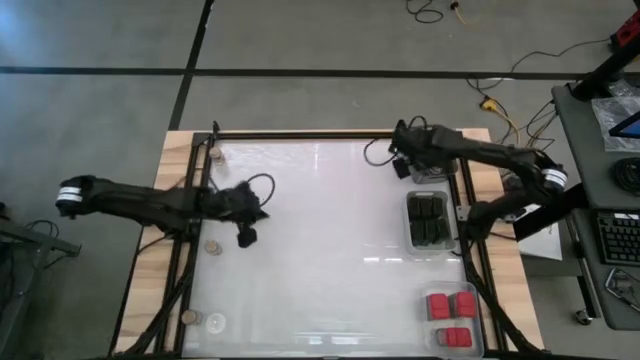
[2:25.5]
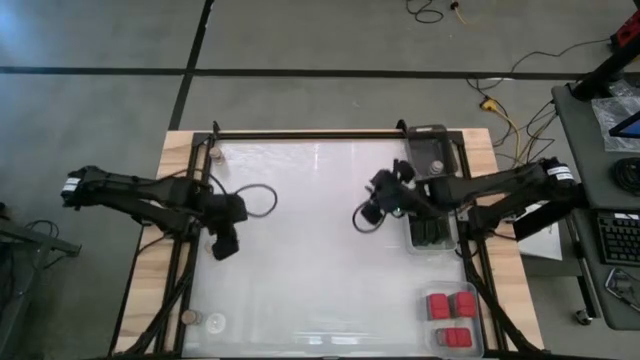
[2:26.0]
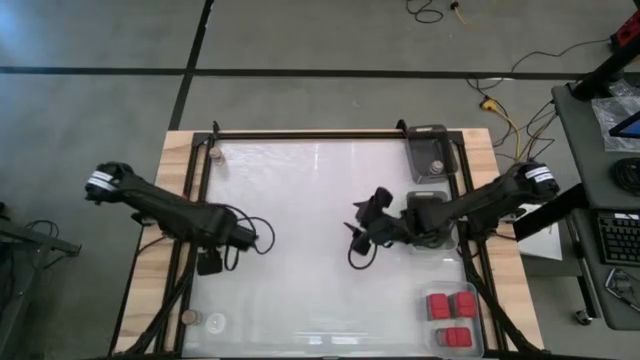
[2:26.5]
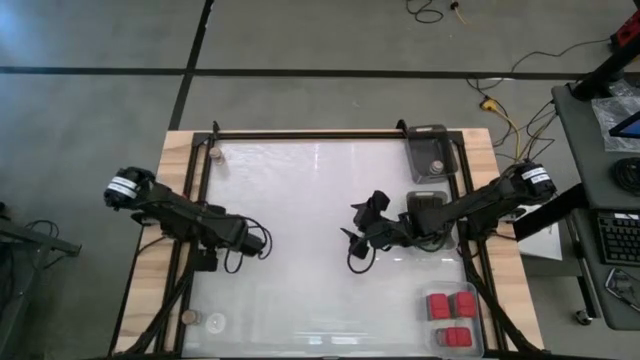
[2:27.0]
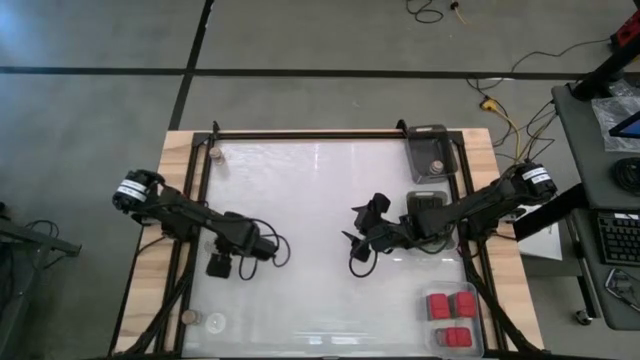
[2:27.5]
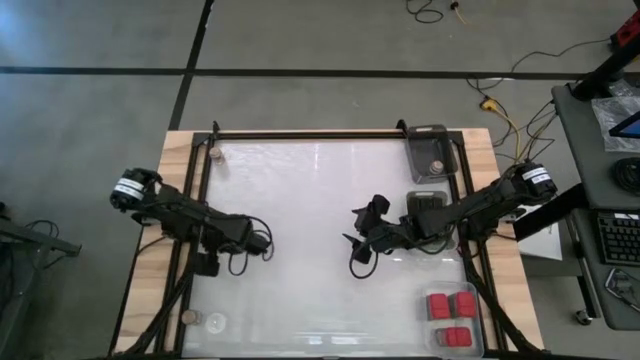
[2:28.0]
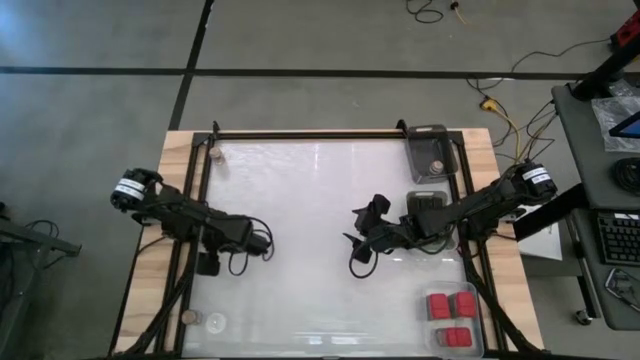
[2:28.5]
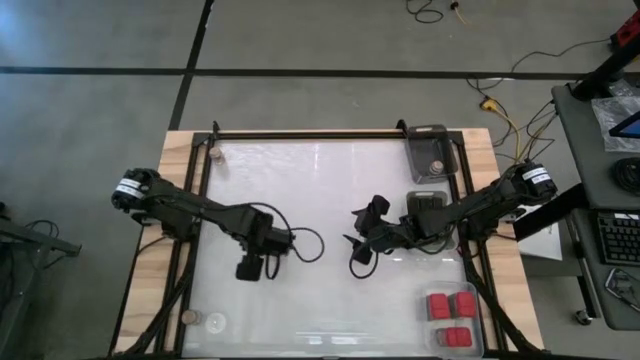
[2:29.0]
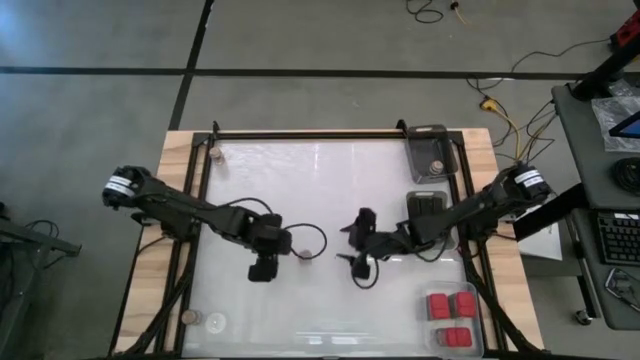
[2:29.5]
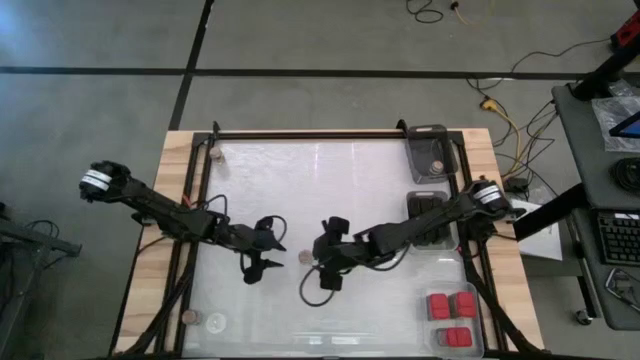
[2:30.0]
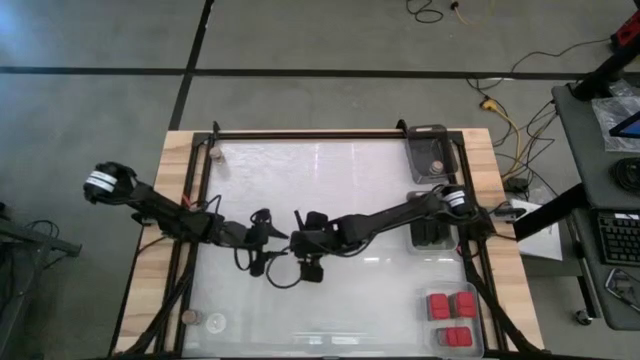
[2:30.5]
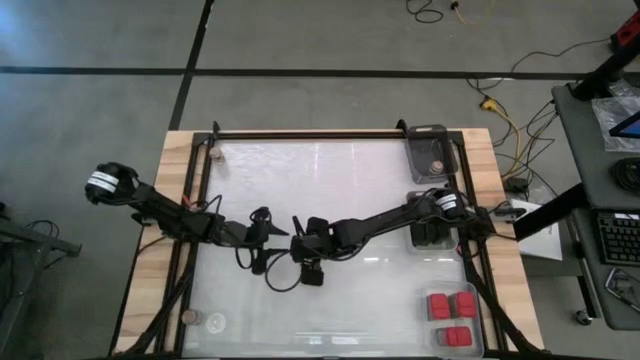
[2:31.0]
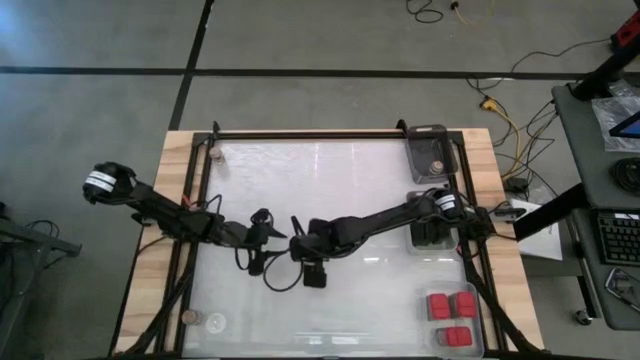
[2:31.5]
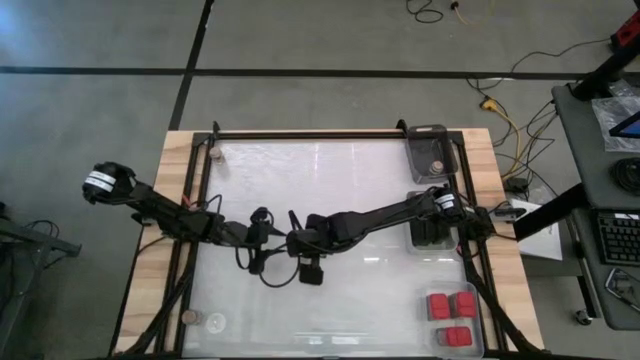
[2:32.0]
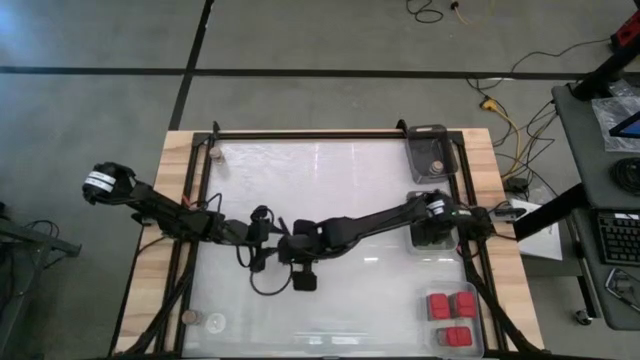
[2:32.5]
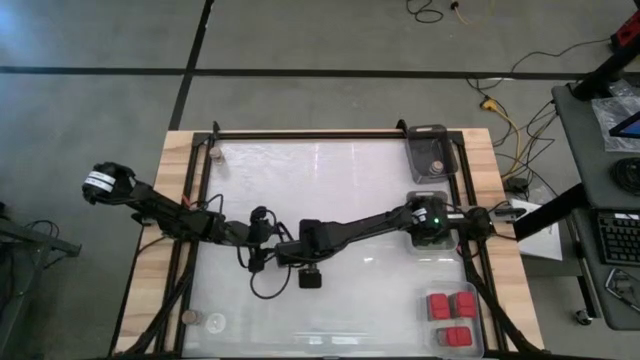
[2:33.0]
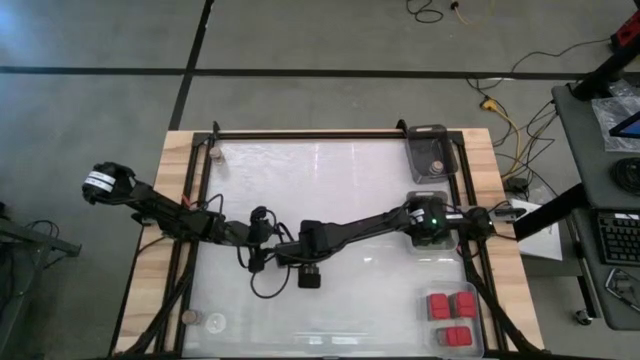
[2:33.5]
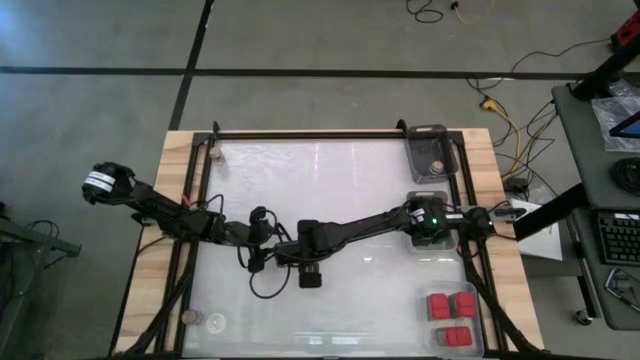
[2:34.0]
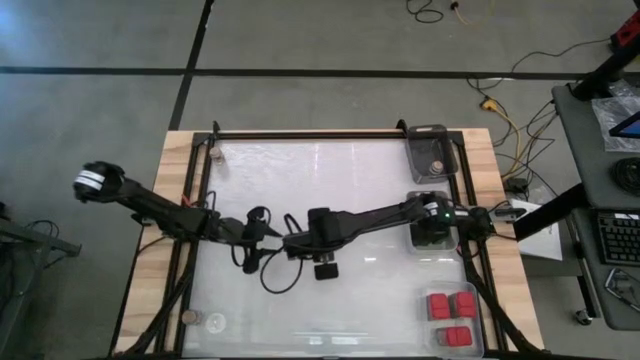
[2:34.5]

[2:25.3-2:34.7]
Task: Sort spices by type
Put the brown seasoning bottle into the black bin

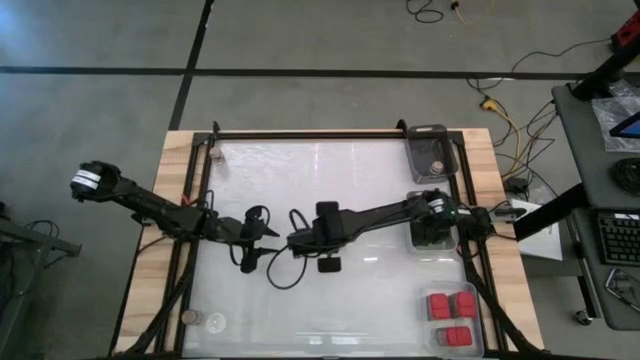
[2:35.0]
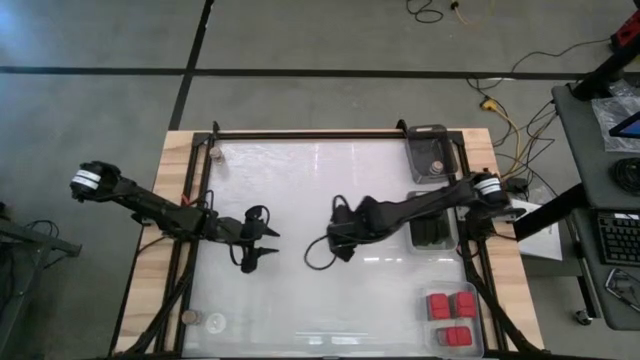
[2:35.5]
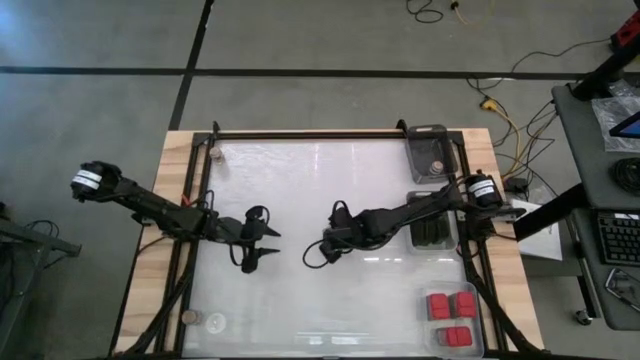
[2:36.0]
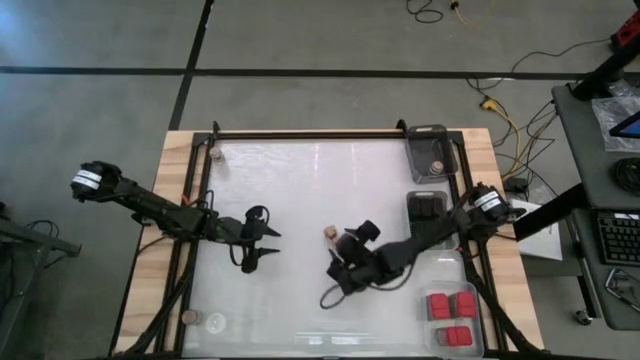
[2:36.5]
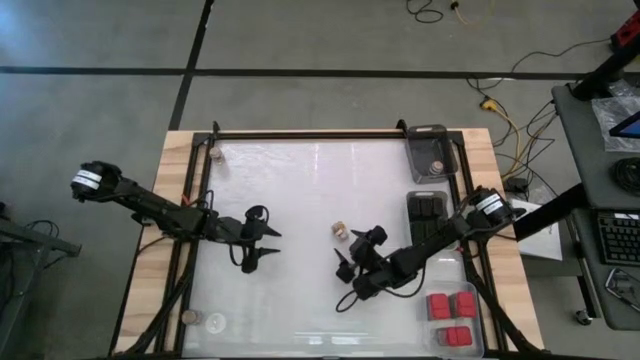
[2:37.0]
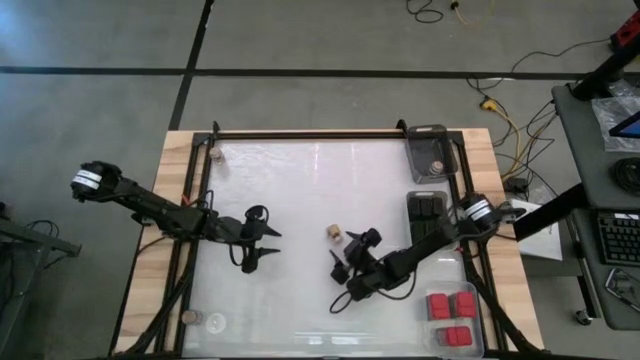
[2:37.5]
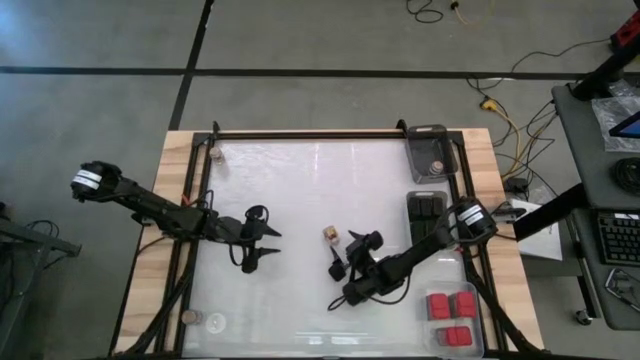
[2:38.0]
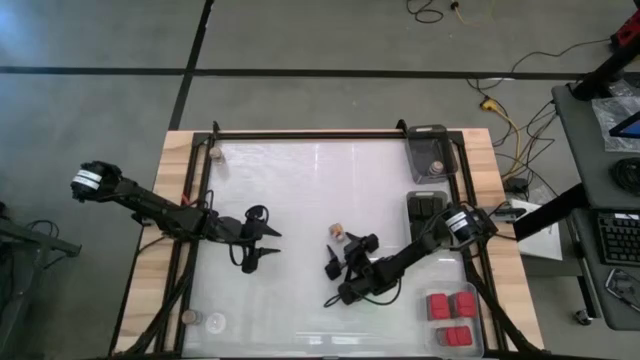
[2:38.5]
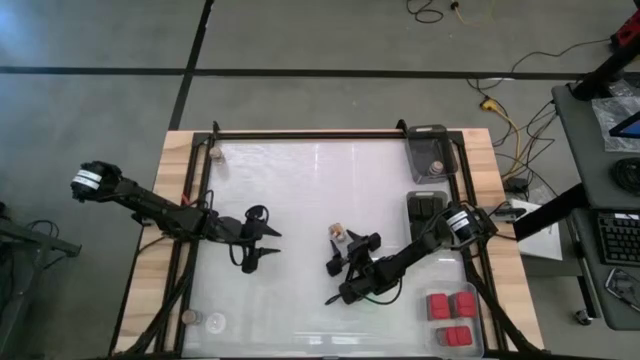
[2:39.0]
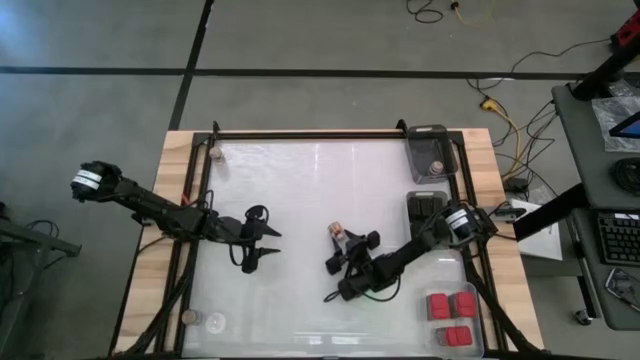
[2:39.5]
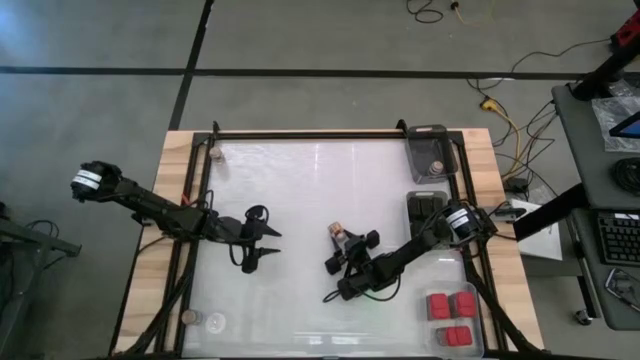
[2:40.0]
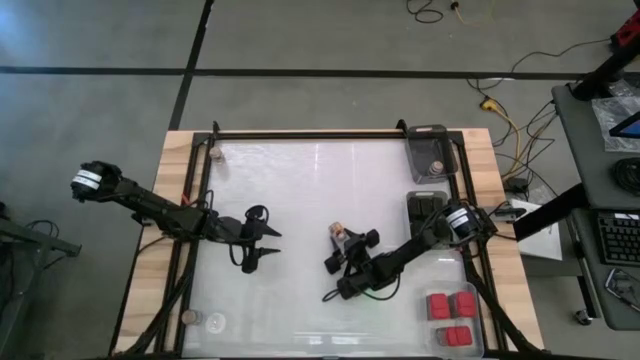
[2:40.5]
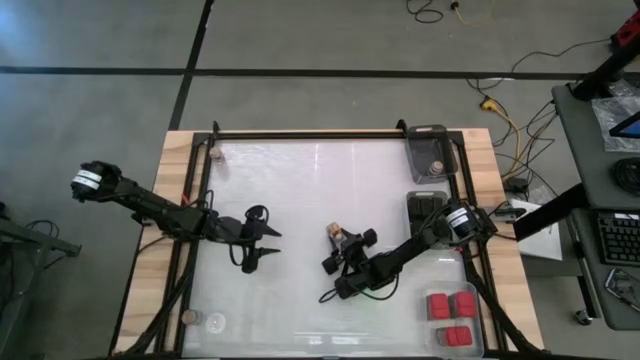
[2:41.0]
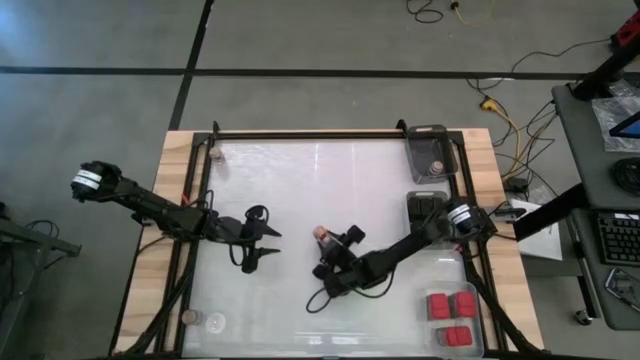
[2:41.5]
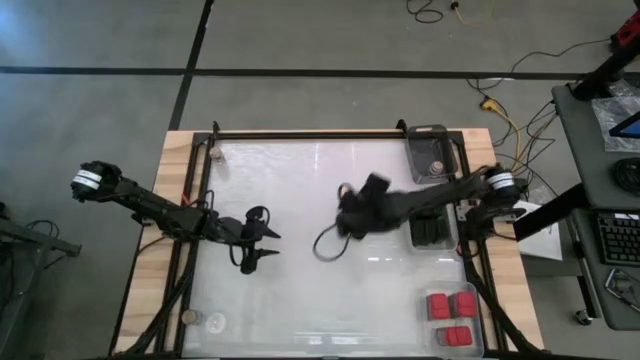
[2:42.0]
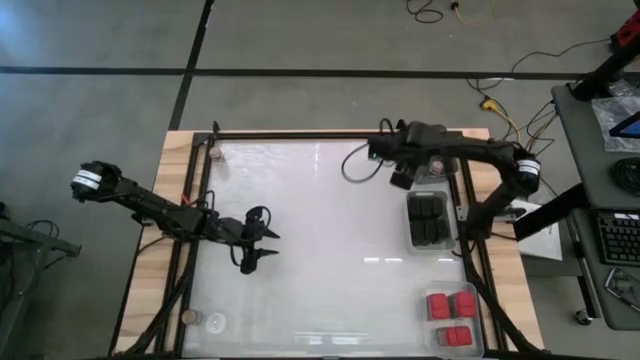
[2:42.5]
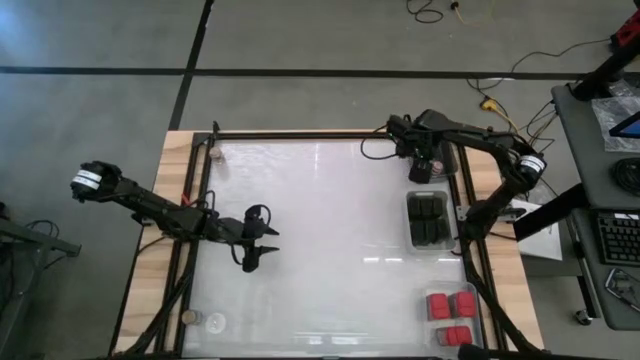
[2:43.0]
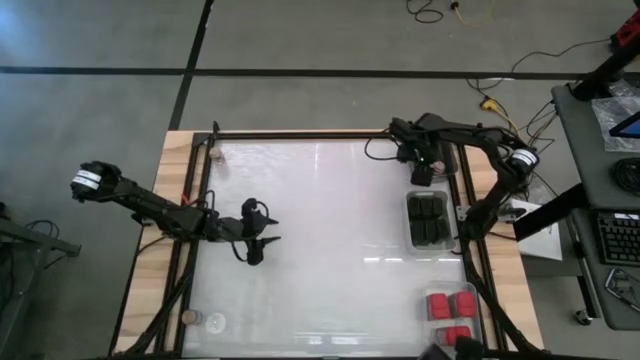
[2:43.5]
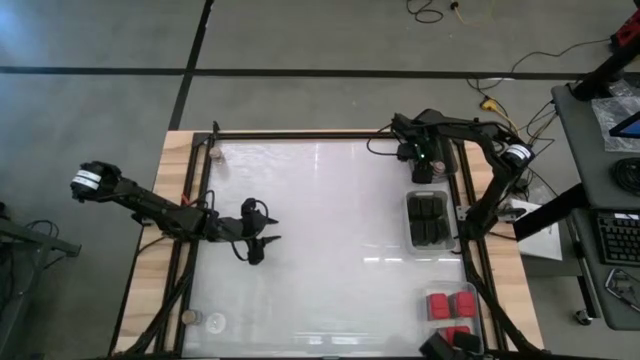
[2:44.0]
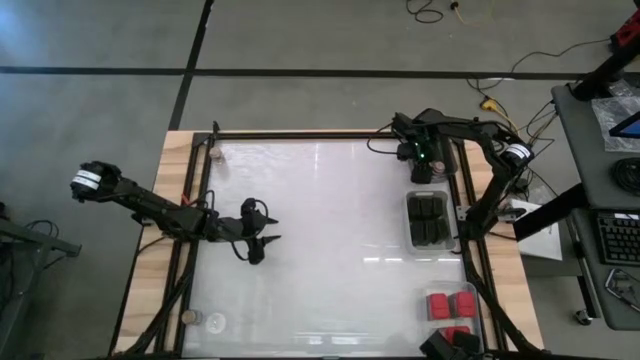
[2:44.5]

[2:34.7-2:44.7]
Put the brown seasoning bottle into the black bin

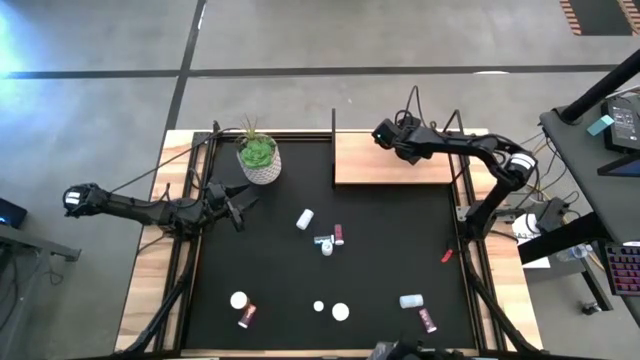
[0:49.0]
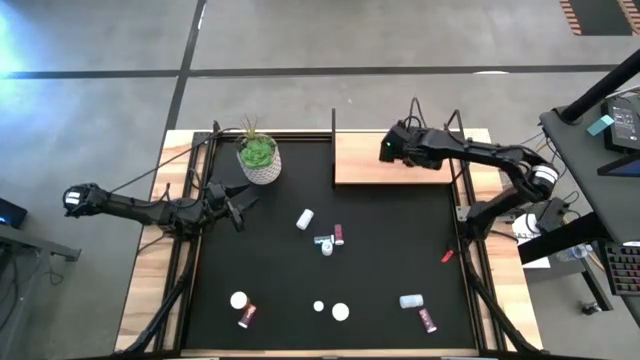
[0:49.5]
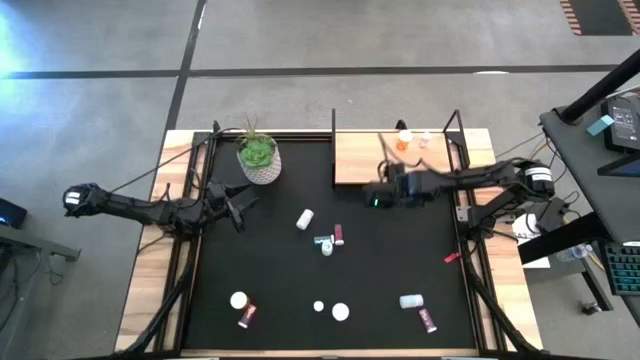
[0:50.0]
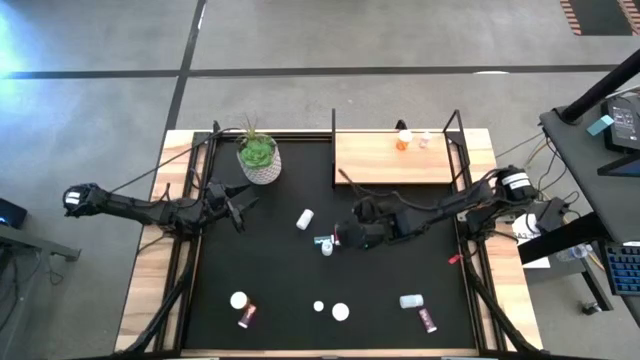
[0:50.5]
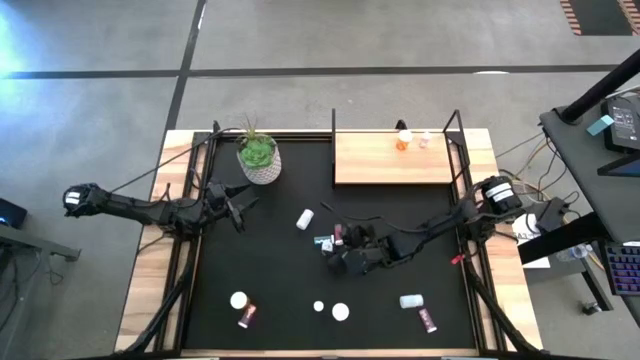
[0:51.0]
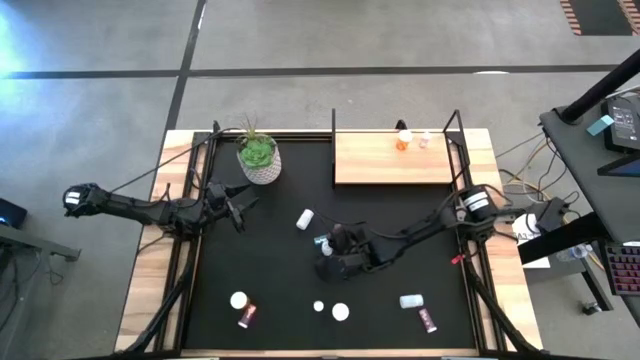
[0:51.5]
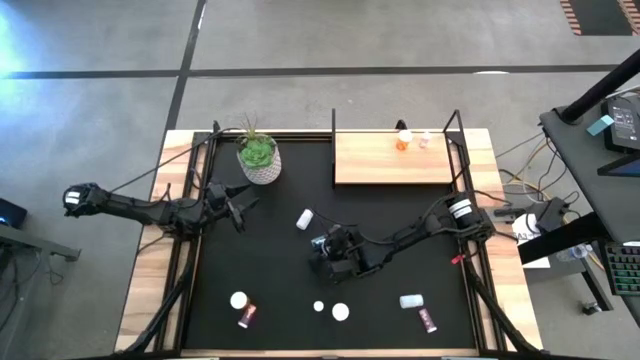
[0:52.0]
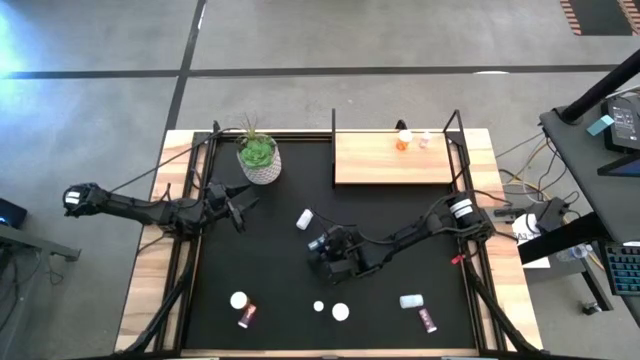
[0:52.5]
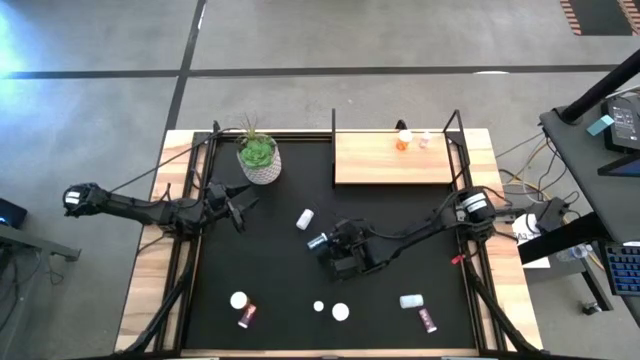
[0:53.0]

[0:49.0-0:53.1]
Task: Pick and place medicine bottles onto shelf by color
Put the middle white pill bottle on the shelf
